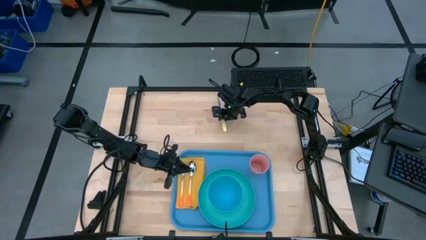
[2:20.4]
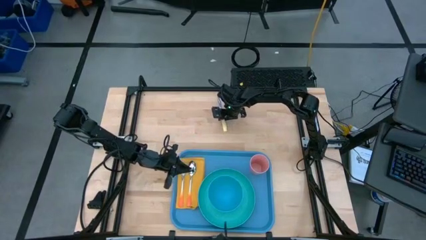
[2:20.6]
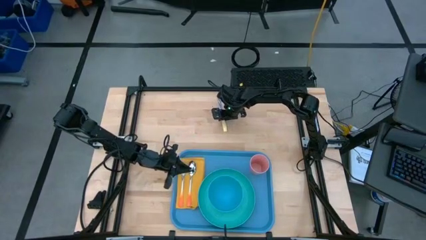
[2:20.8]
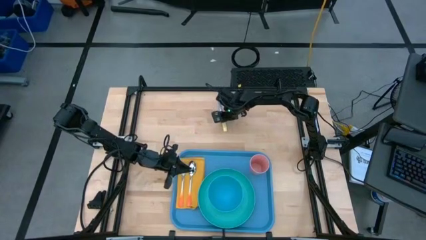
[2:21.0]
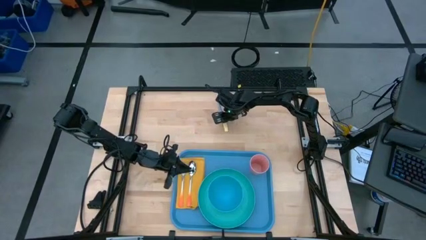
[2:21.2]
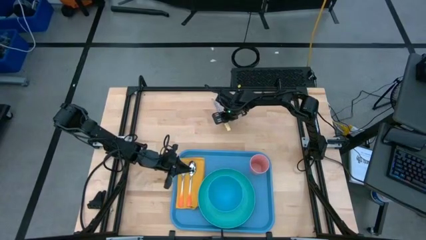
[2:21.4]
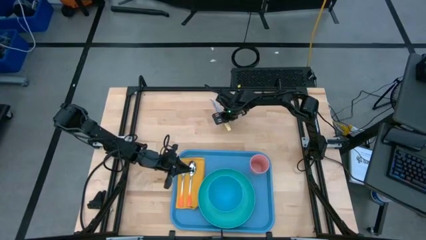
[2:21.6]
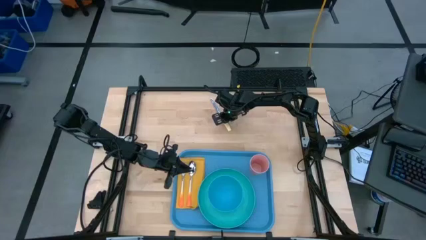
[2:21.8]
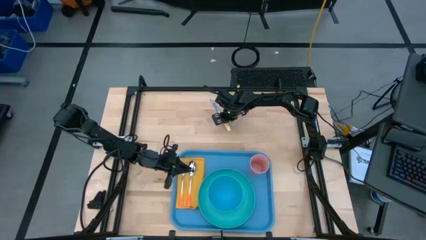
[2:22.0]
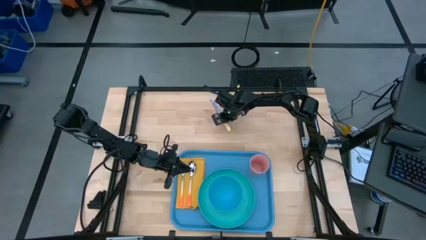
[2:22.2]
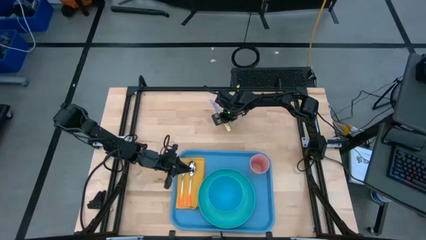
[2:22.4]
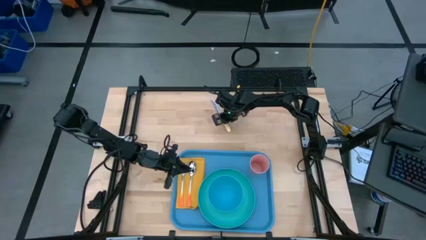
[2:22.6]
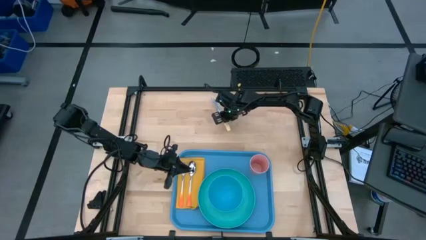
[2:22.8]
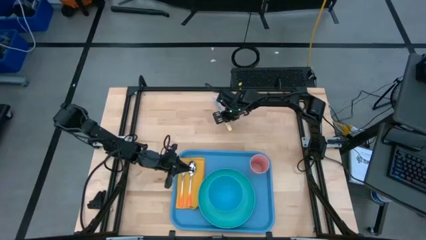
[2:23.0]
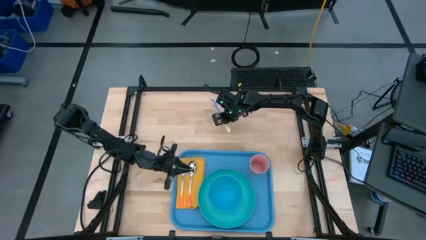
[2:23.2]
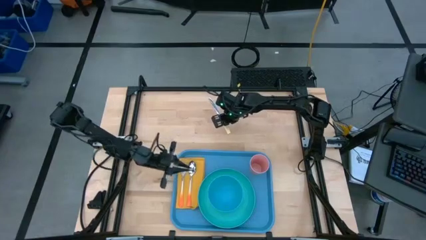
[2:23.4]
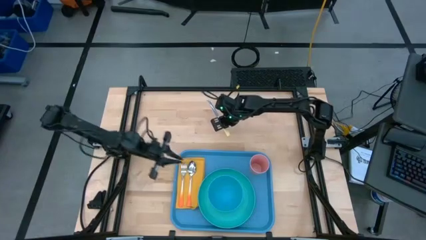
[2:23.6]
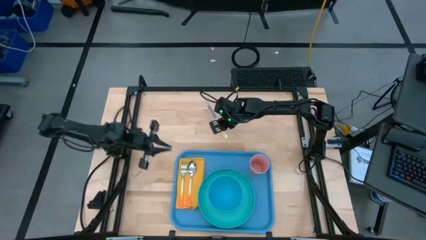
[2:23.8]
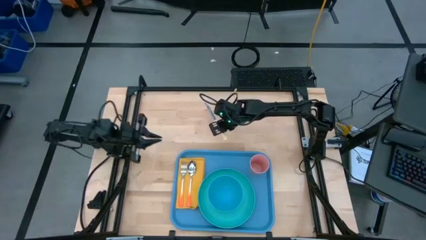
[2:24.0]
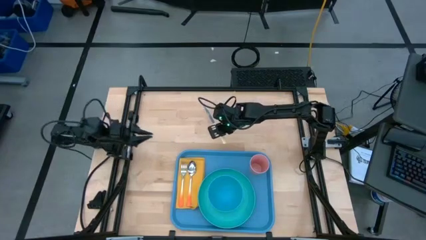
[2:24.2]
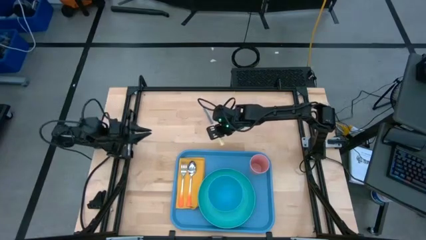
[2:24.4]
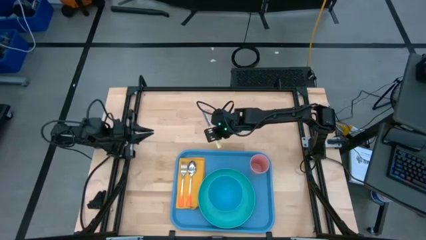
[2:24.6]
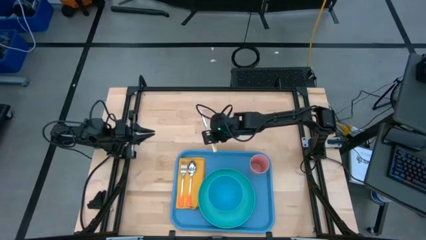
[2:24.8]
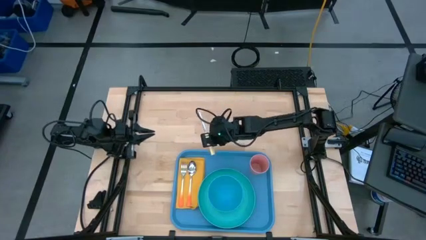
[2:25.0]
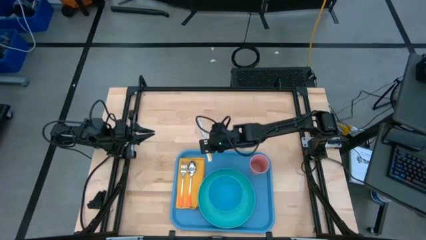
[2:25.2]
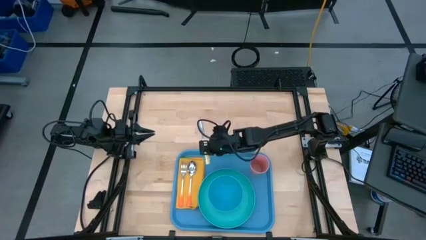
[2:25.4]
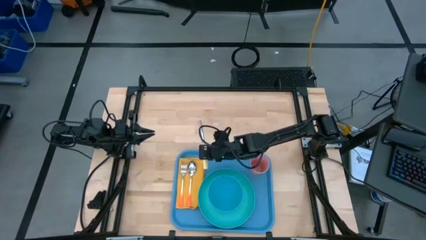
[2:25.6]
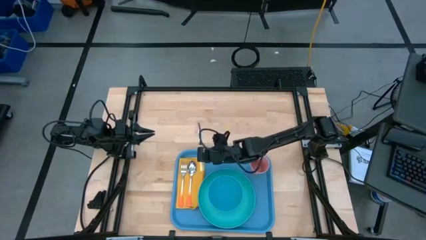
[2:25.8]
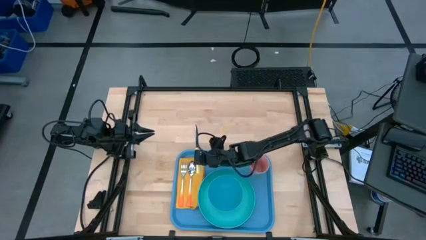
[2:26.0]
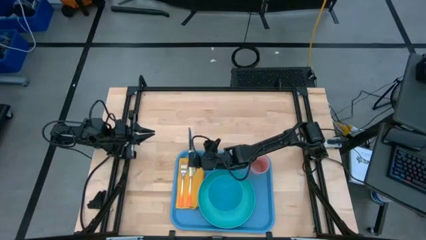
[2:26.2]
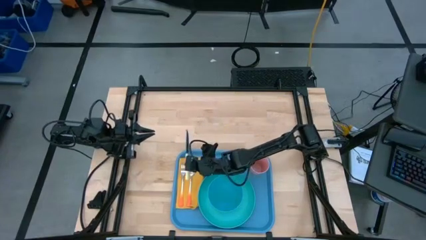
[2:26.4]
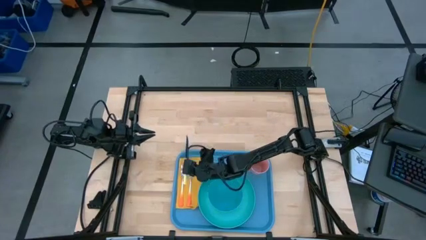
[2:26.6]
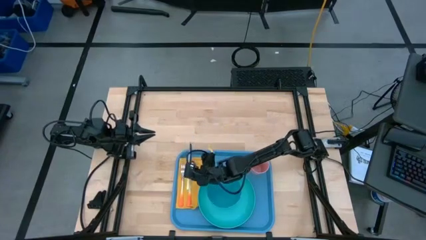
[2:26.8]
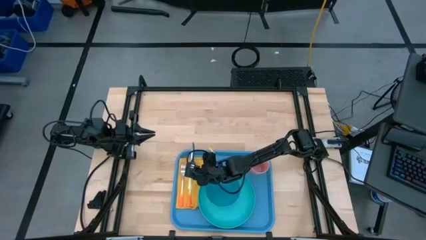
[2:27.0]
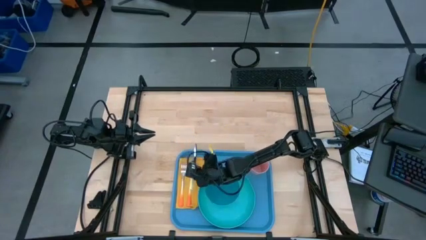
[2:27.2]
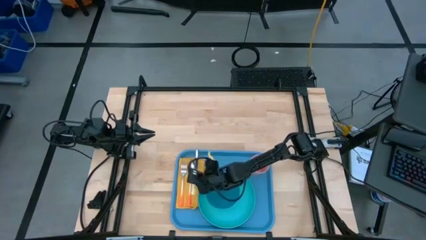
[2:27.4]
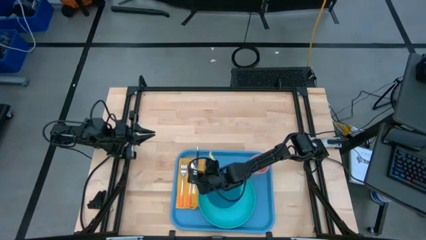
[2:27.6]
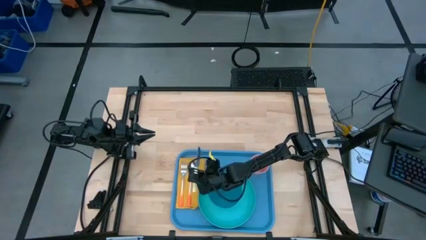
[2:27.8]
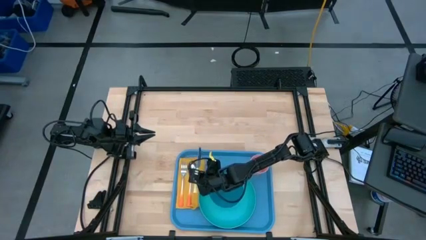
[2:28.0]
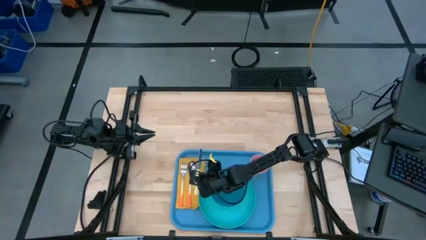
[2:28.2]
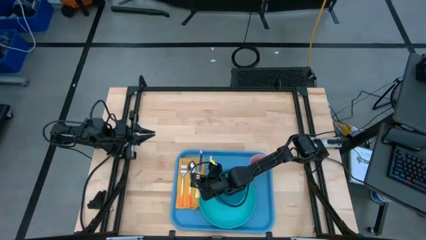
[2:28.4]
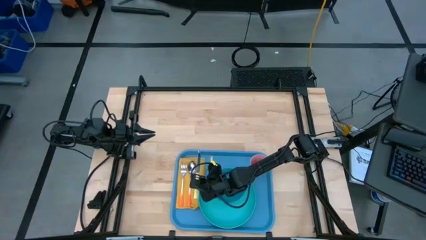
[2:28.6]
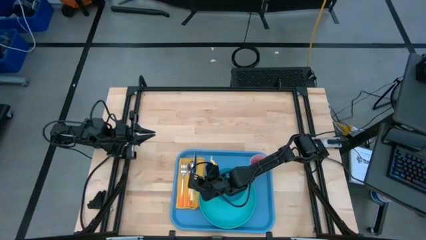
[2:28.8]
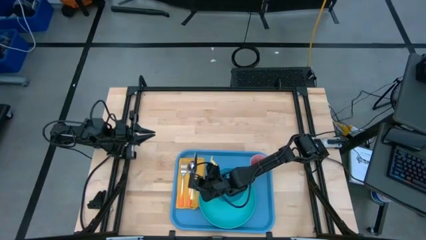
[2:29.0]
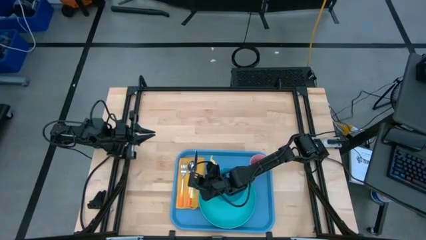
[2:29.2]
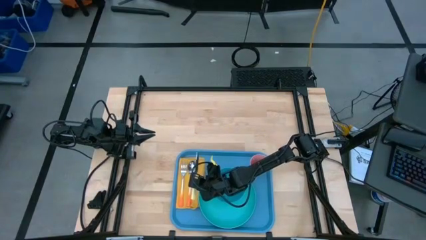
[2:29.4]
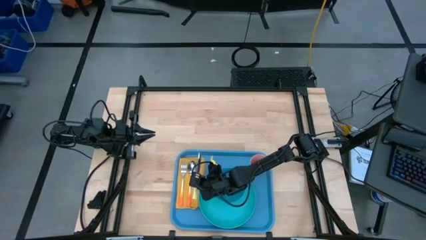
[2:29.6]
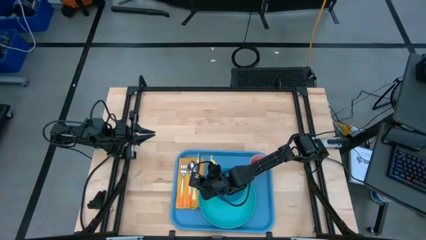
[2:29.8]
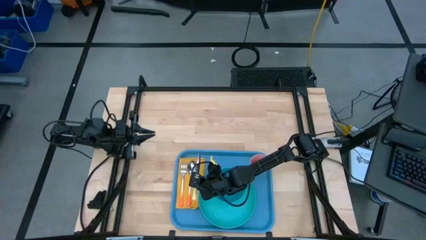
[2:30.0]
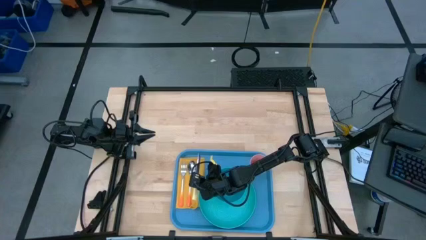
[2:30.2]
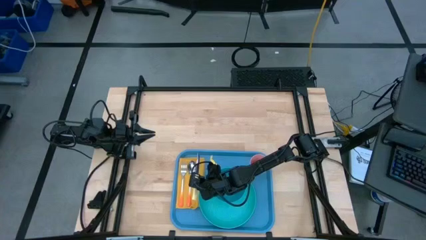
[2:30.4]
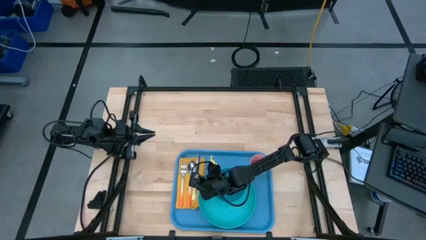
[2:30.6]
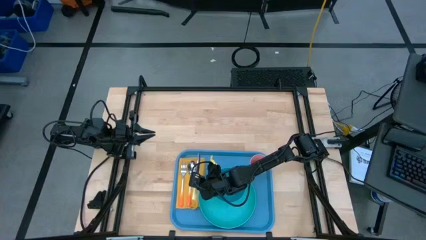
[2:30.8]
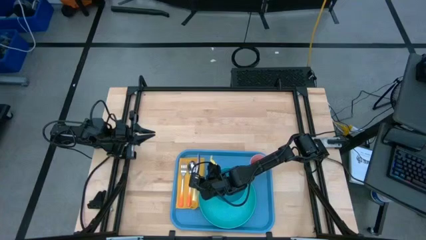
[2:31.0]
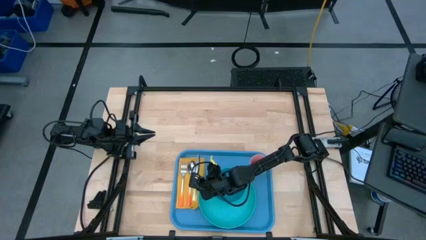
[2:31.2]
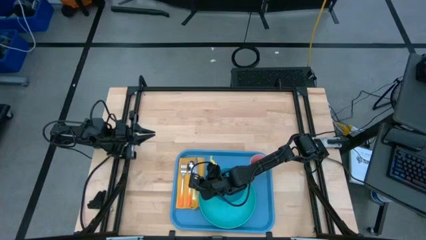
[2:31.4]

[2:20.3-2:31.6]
Task: Set up tray
Put the yellow knife to the right of the orange spoon on the orange napkin on the blue serving tray

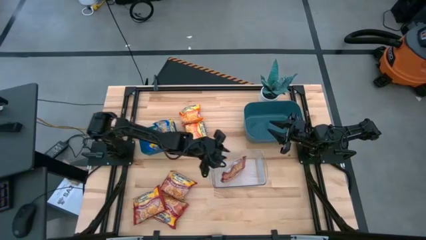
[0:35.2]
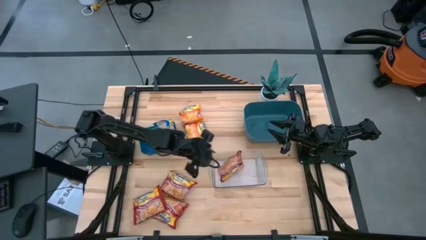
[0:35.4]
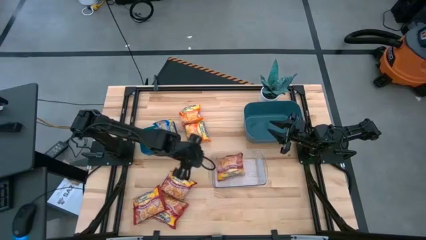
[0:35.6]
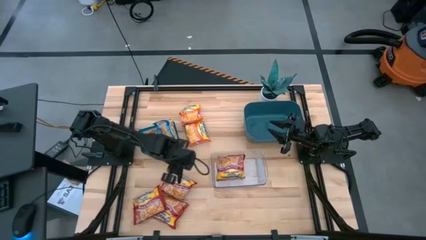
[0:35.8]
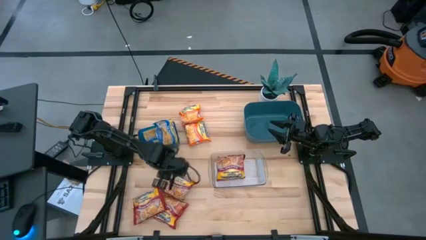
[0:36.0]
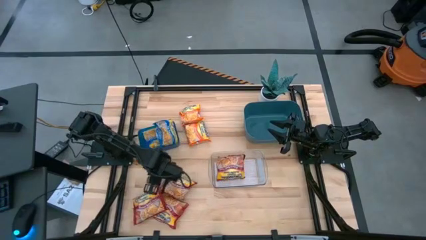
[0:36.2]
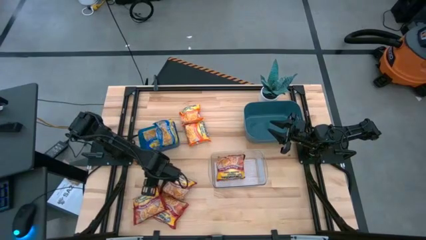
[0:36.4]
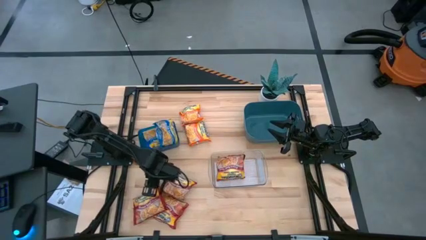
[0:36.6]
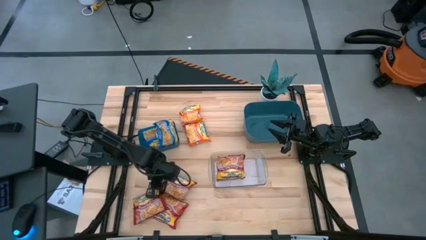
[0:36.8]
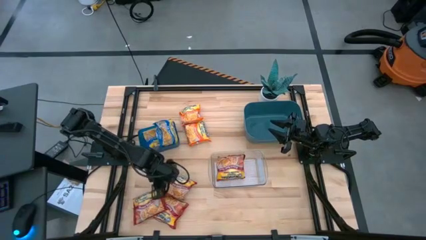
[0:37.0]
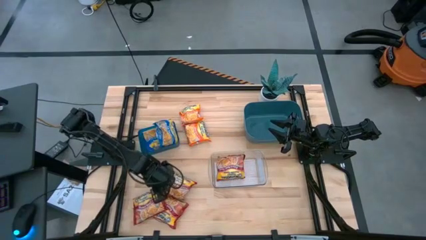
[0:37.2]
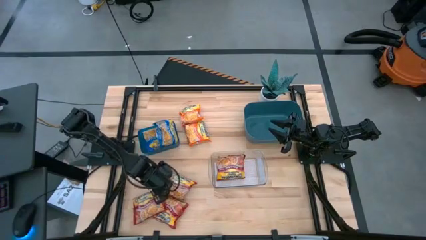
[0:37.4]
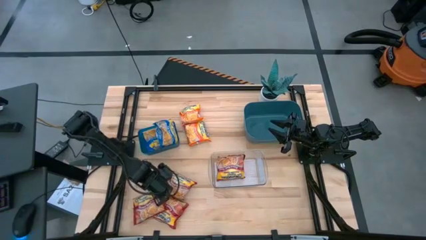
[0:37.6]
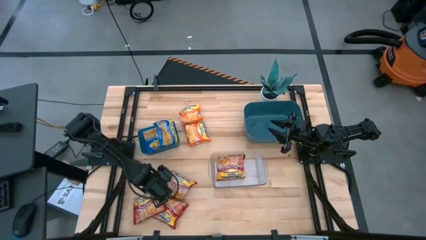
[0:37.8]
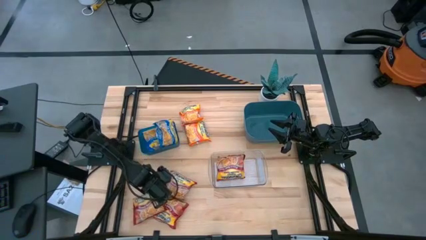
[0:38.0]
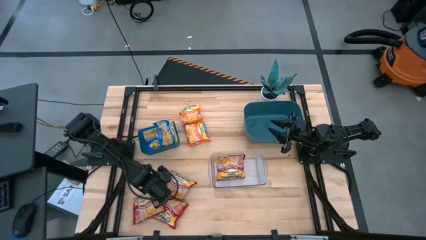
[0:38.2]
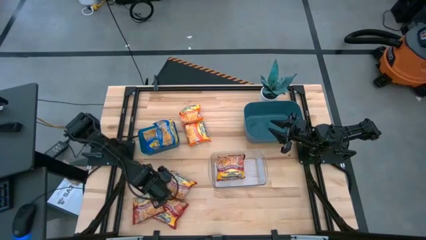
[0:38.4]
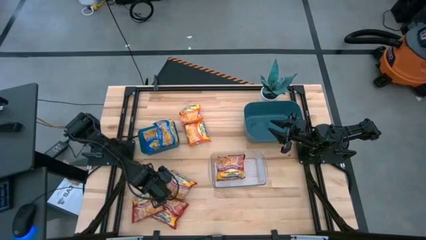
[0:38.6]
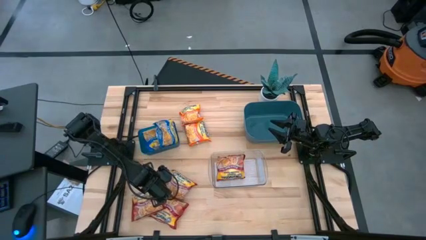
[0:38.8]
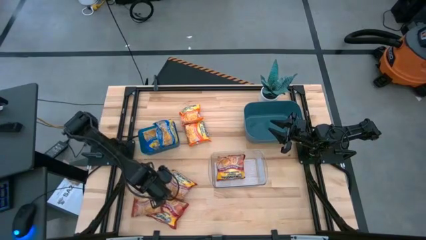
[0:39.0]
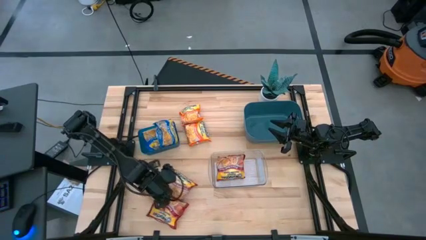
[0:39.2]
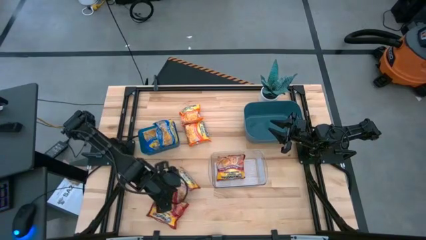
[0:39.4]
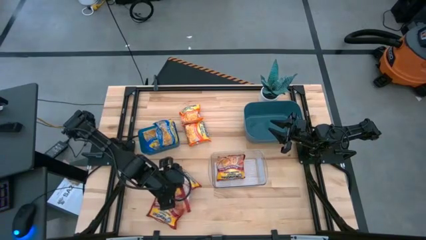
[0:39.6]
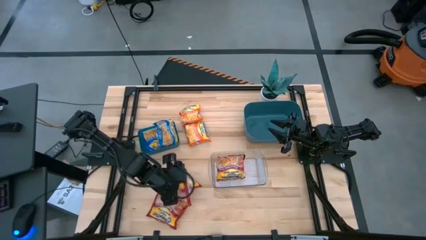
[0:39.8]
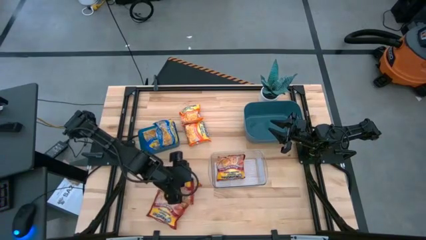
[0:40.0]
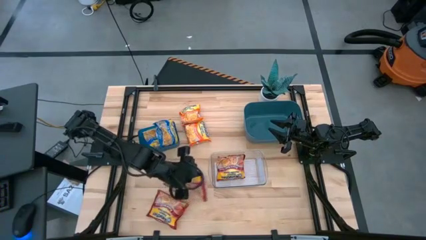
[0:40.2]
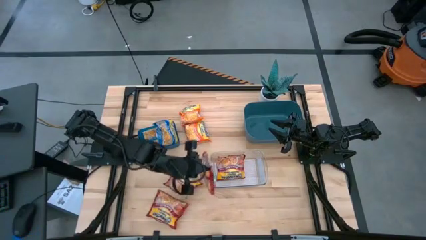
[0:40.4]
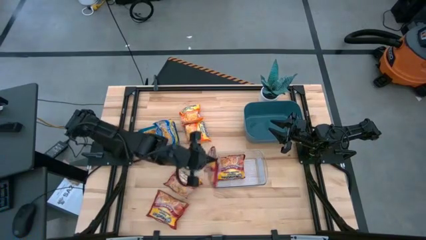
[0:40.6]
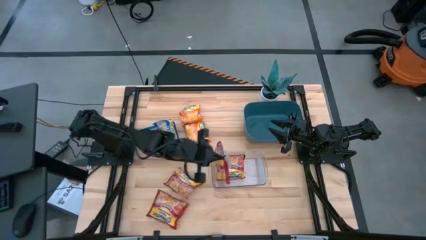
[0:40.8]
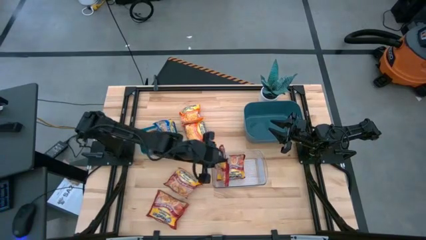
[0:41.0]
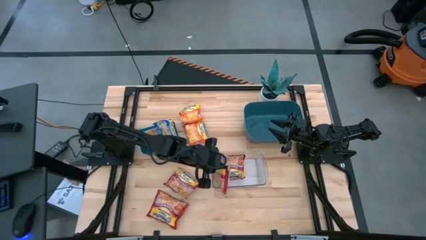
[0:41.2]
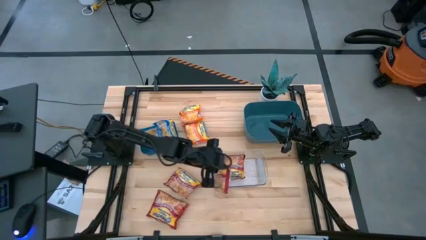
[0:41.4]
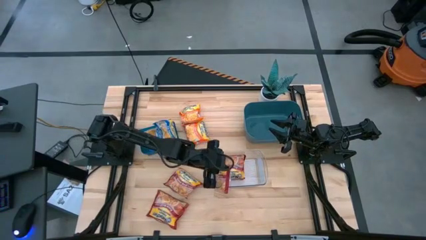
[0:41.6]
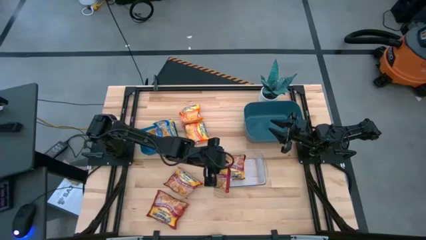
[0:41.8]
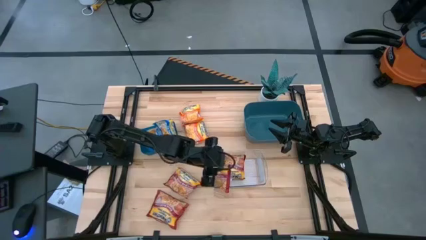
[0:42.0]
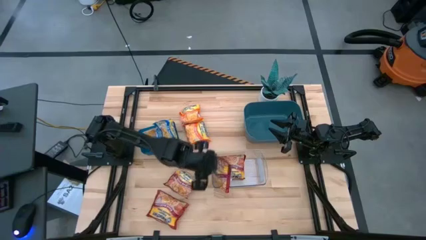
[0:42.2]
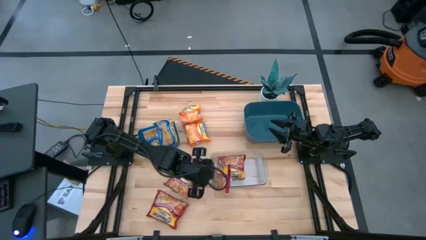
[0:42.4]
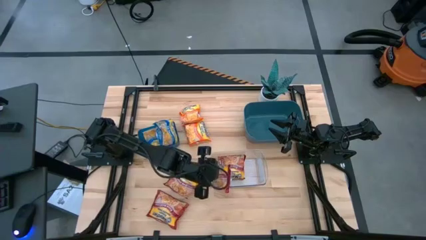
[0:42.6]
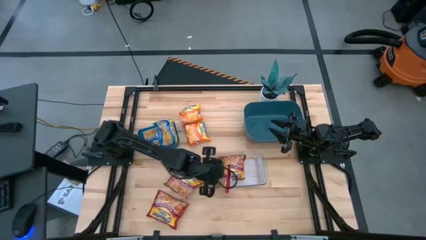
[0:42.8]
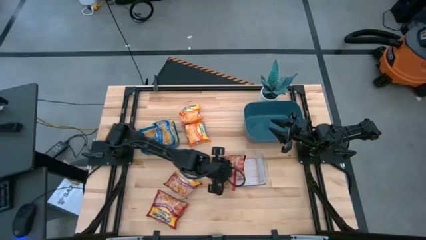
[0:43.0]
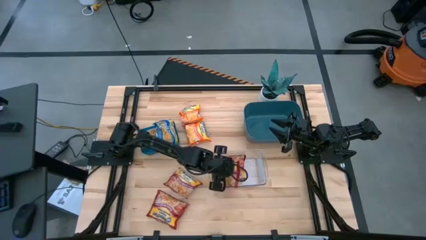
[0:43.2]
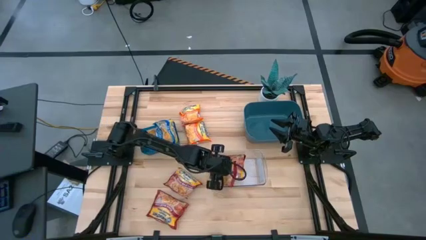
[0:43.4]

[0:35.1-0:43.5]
Task: Sort Maruchan noodles
Put the red noodle pack into the transparent bin
